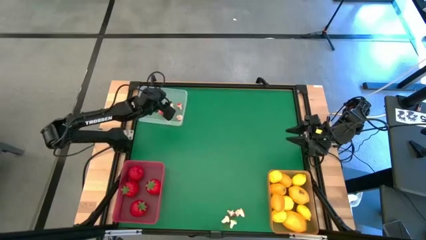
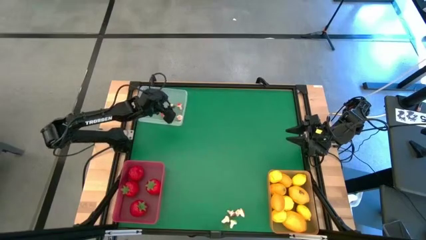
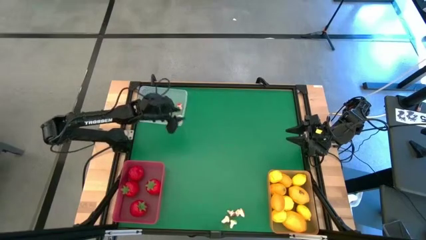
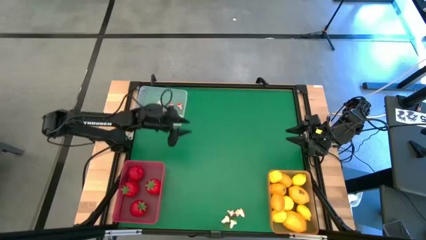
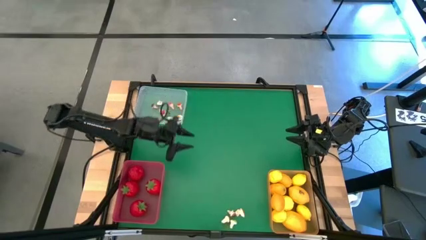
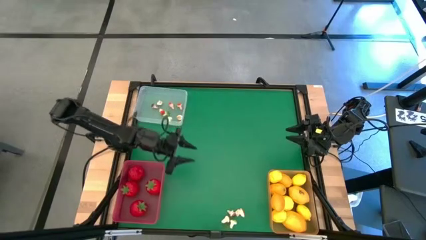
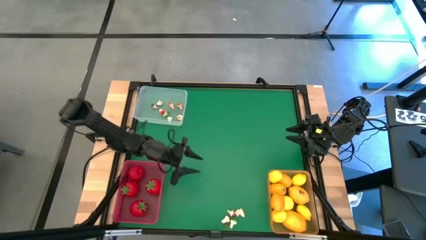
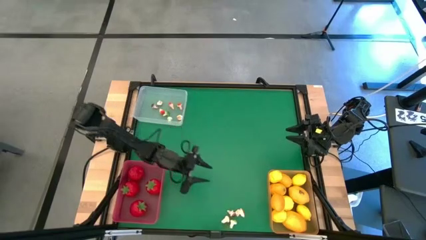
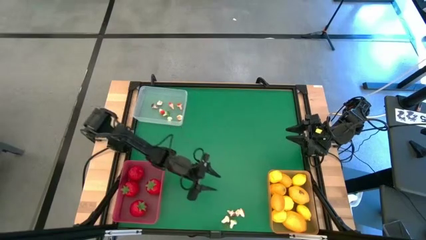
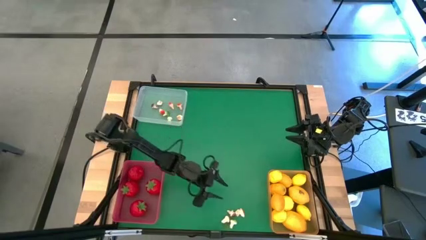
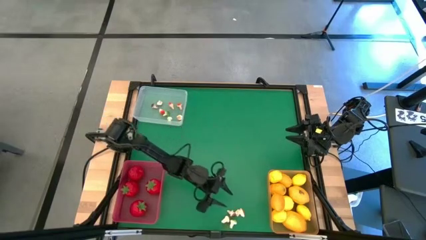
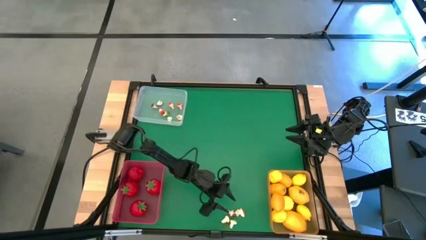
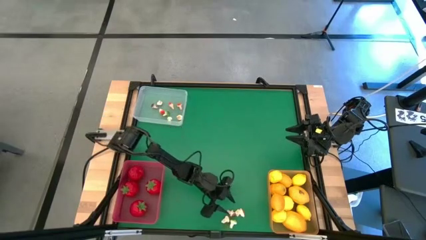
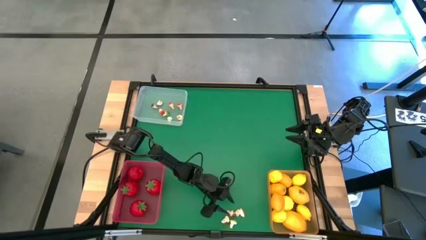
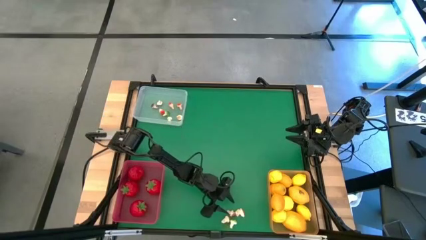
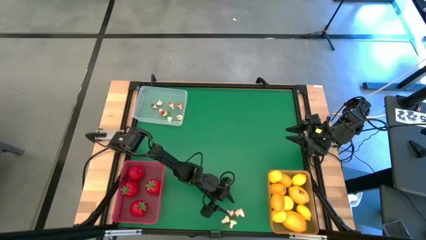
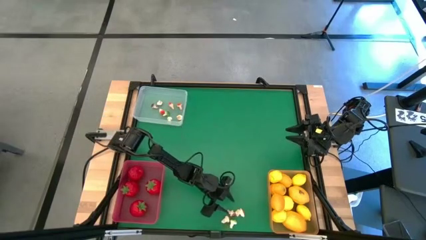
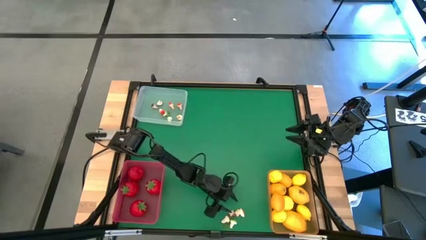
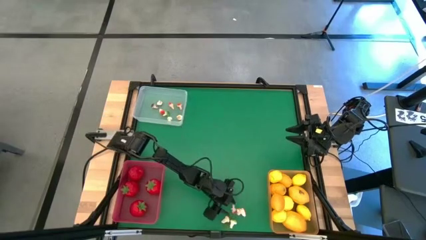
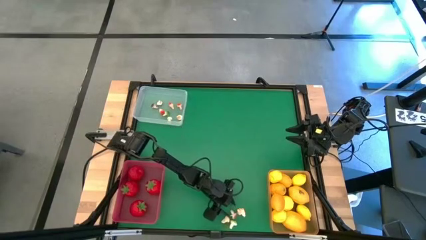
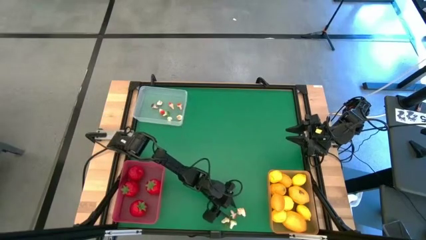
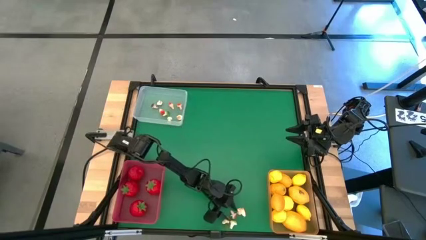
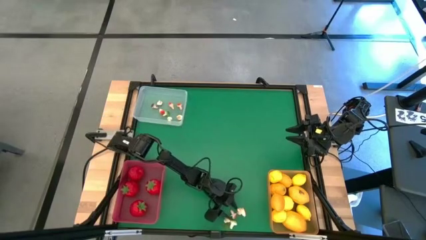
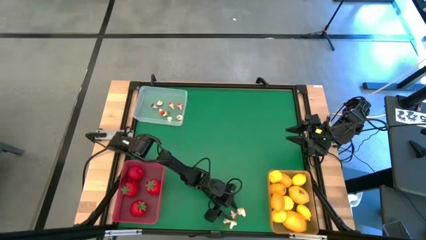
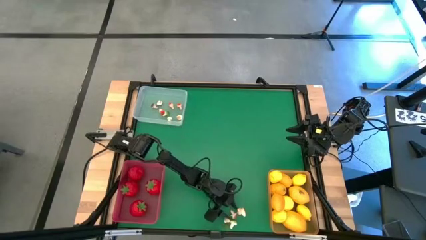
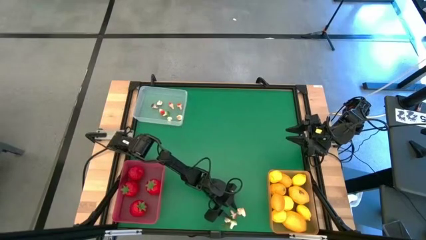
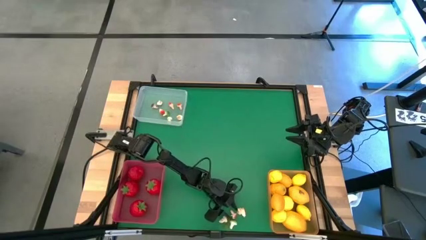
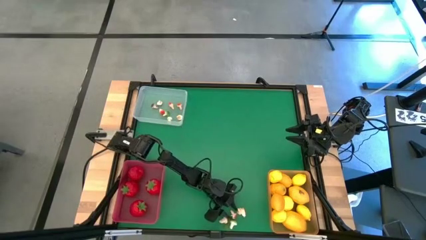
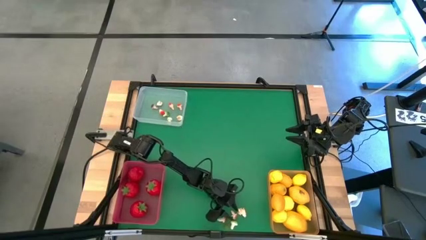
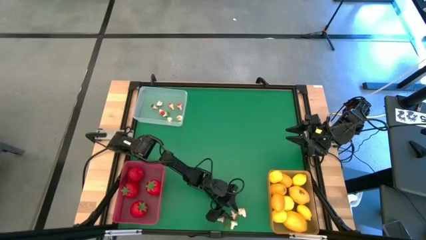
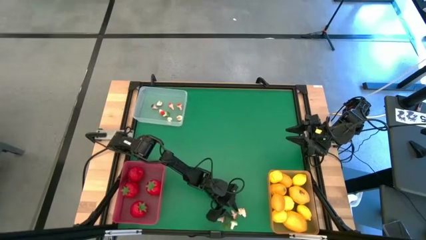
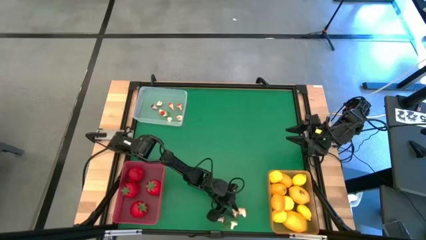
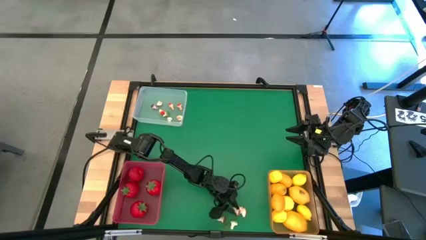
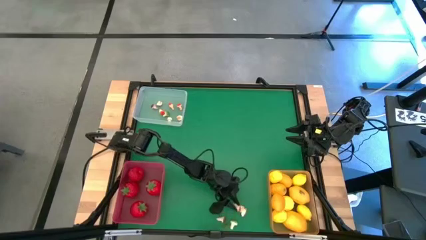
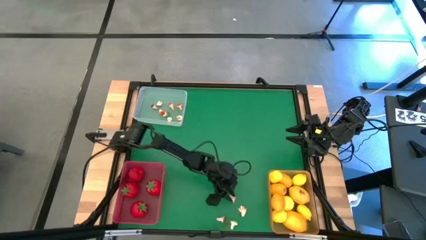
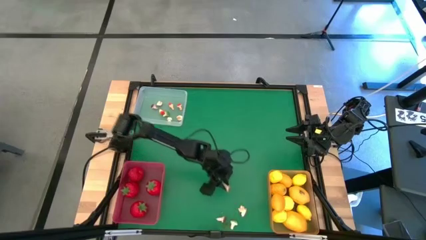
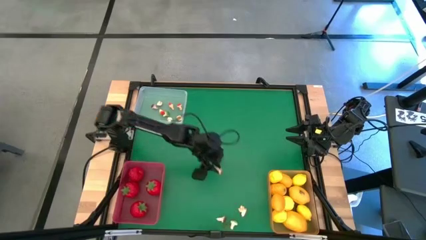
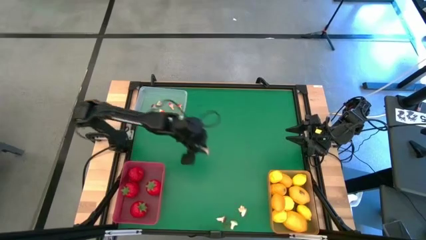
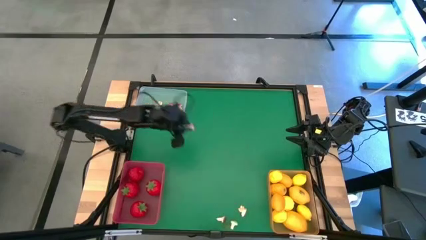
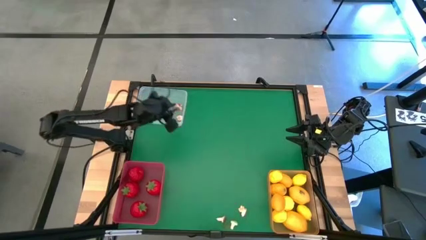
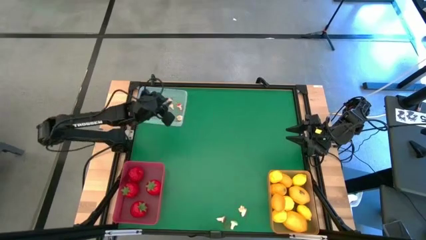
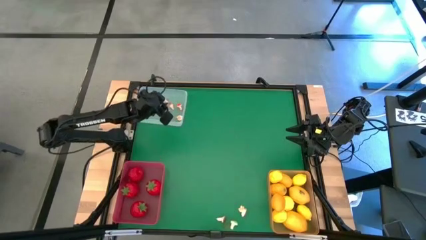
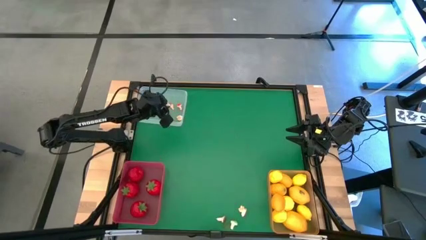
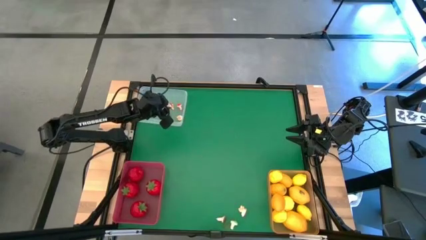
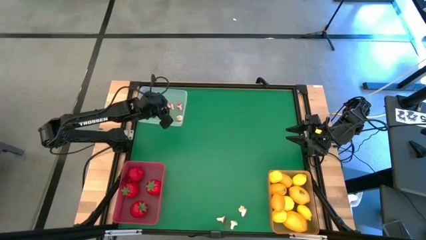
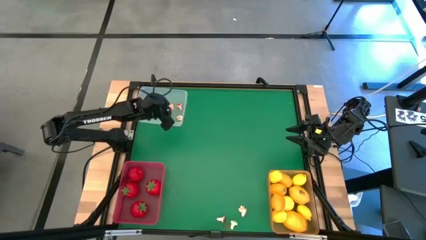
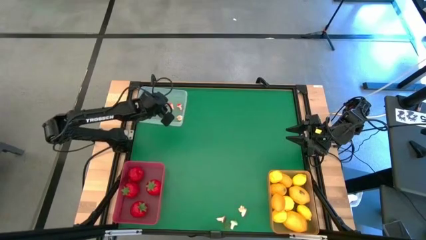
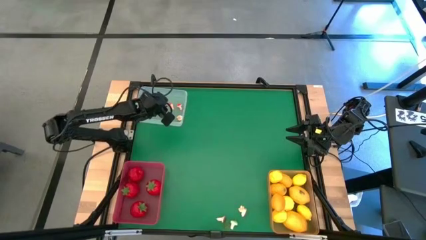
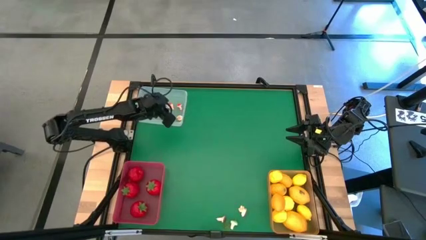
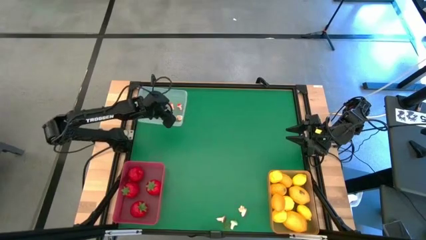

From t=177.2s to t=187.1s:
Task: Sort produce into baskets
Put the brown mushroom into the white bin

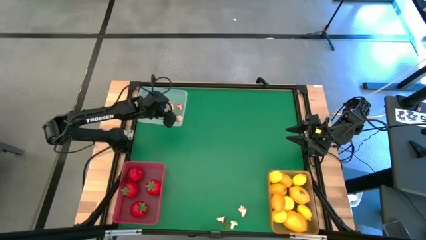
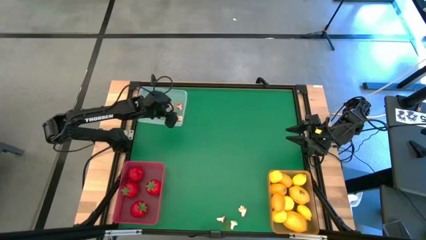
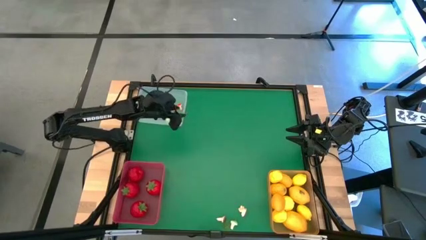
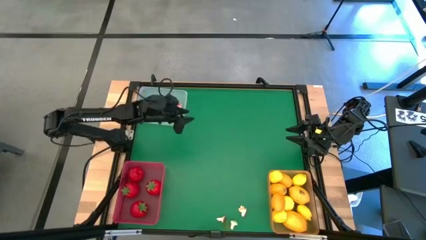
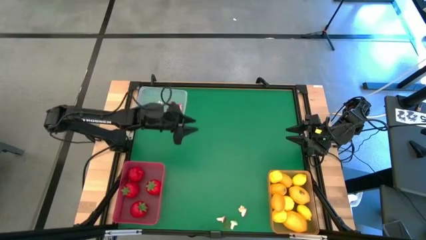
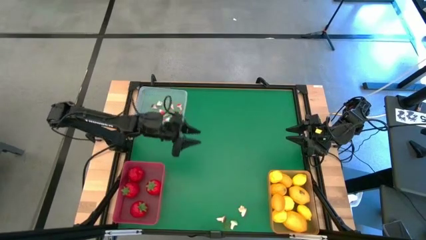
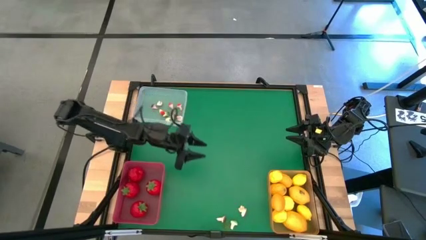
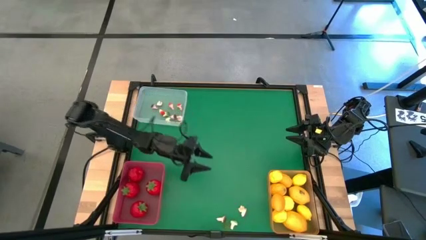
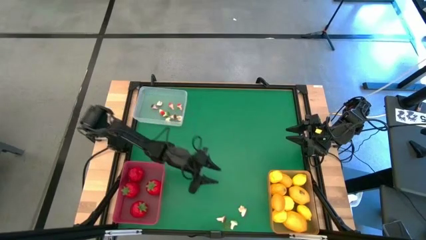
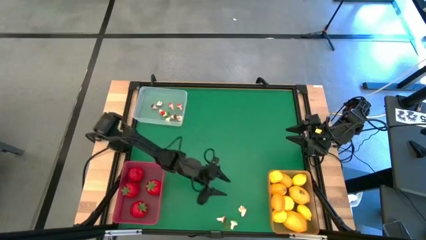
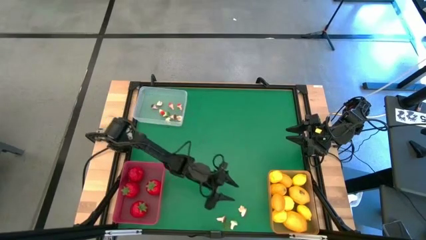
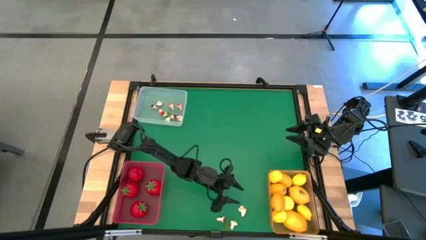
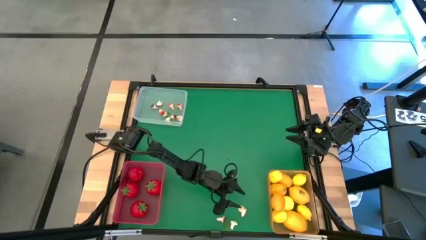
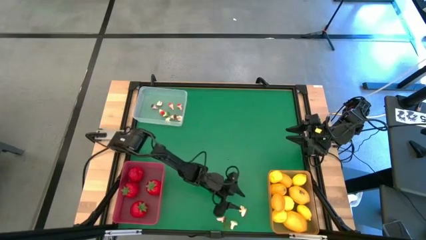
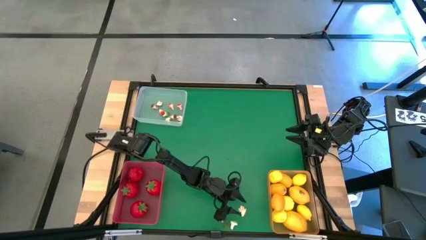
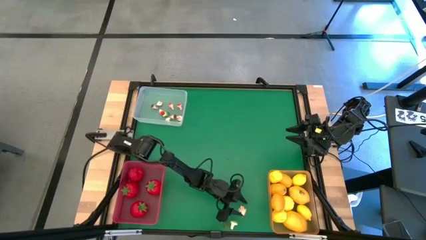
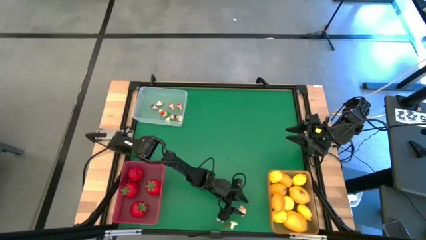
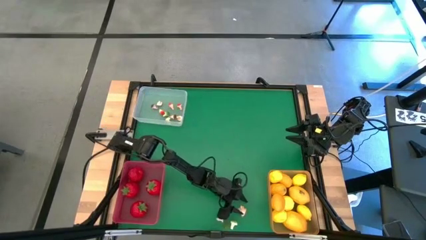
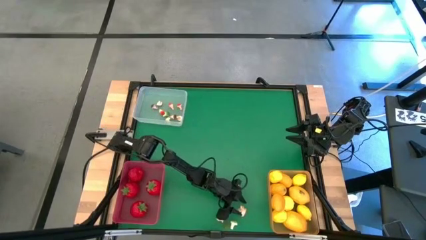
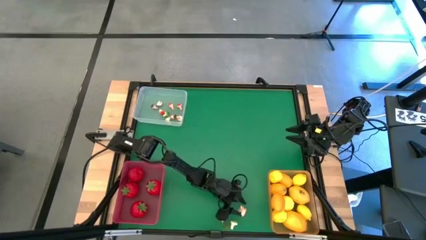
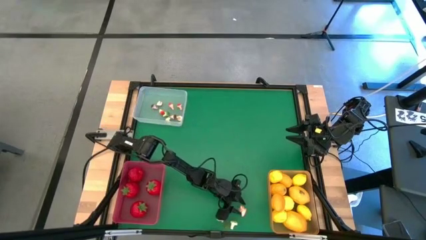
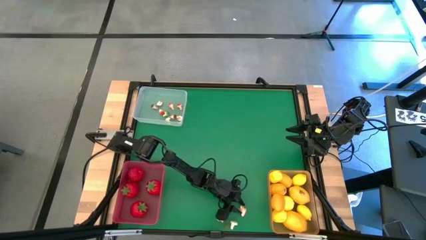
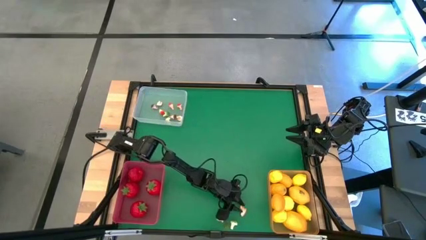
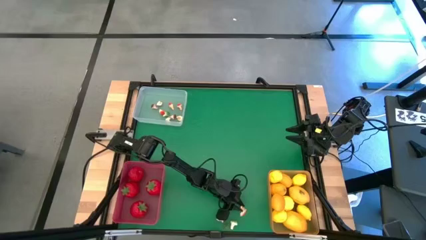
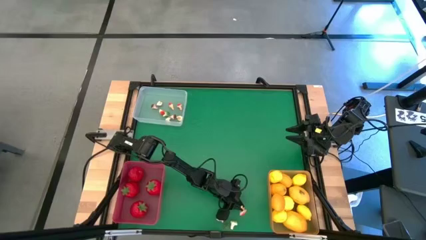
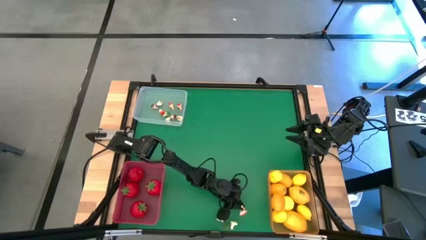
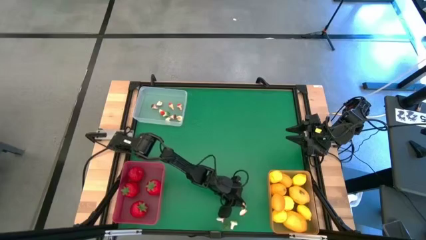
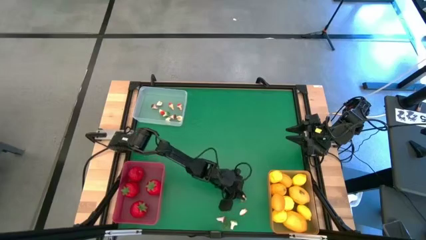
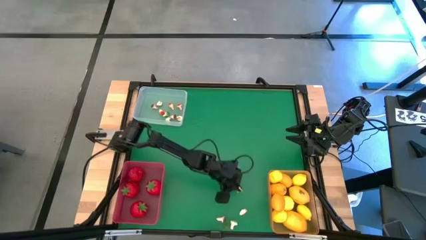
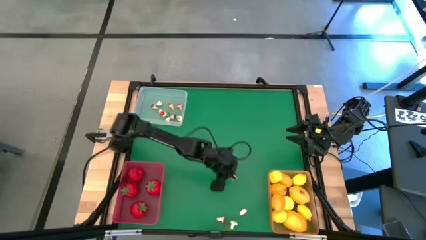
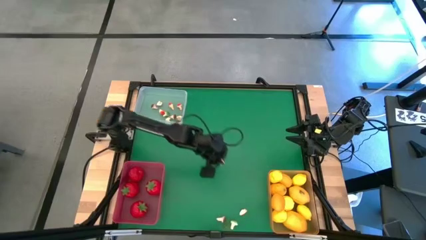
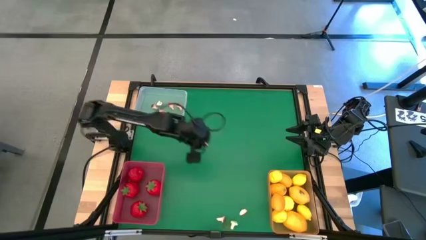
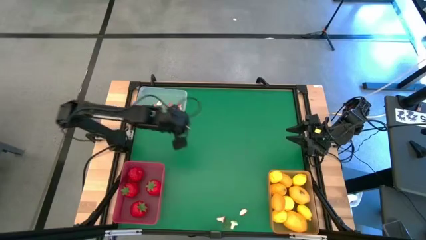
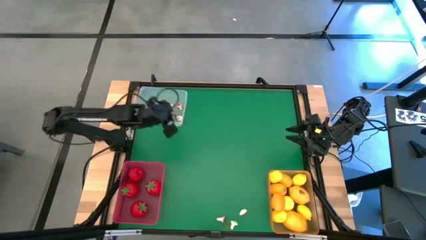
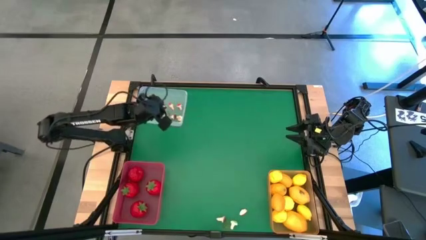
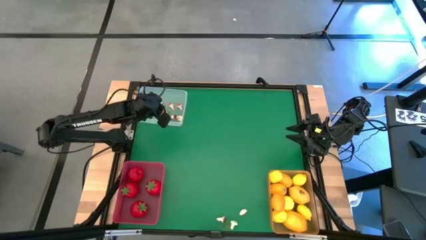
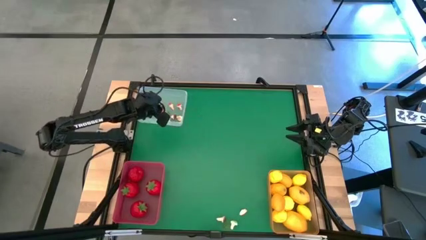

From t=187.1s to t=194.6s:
Put the brown mushroom into the white bin
